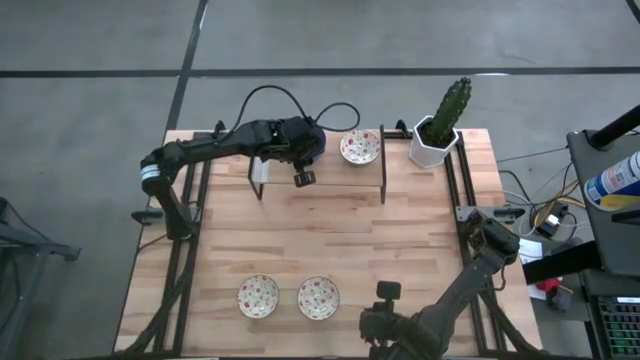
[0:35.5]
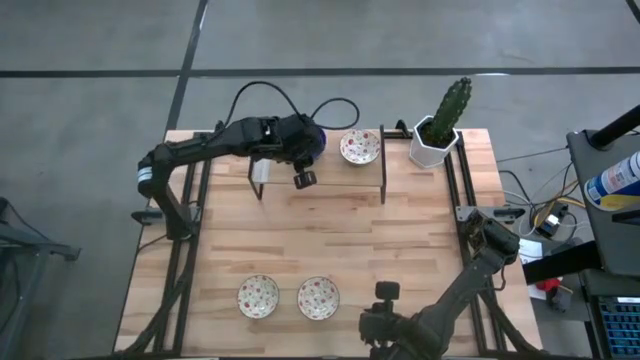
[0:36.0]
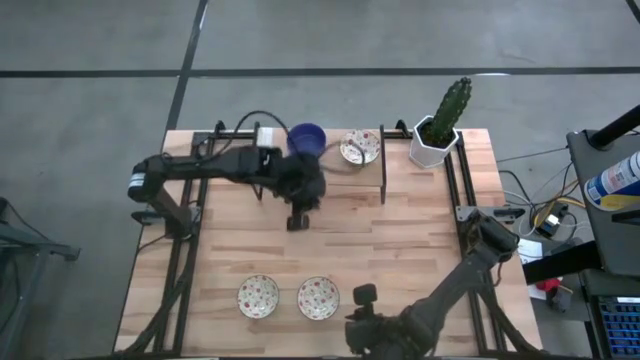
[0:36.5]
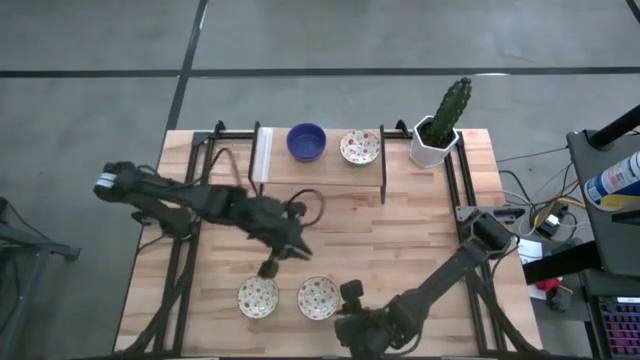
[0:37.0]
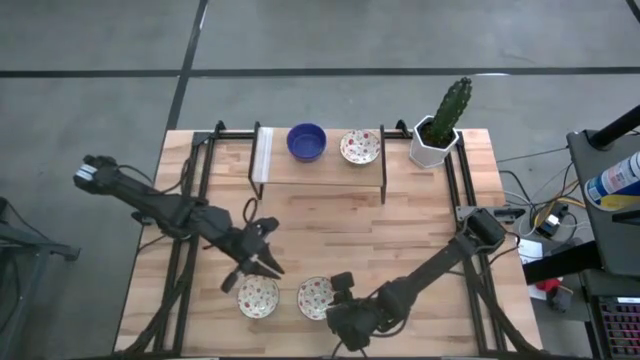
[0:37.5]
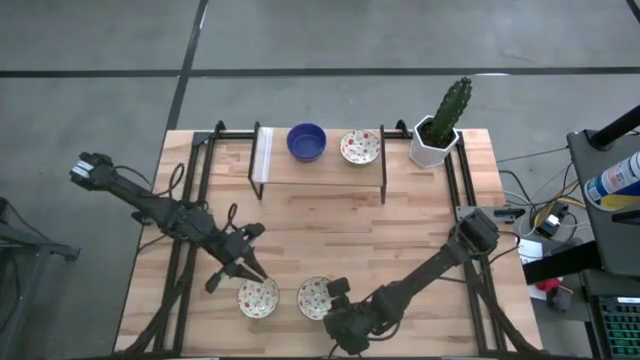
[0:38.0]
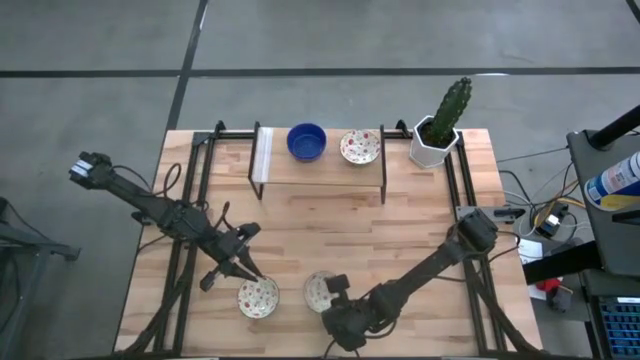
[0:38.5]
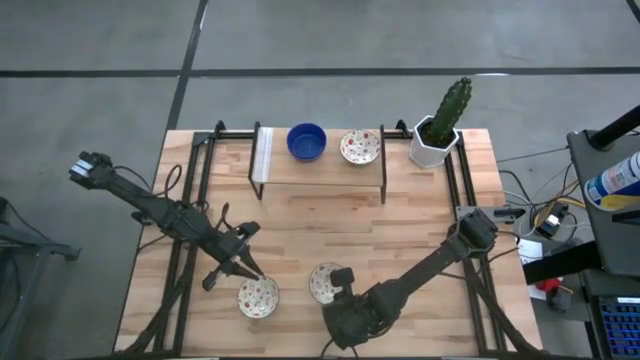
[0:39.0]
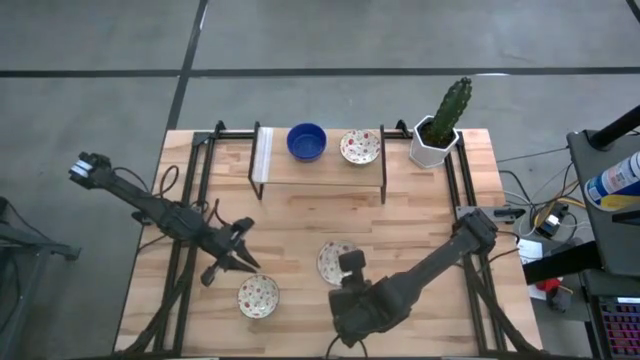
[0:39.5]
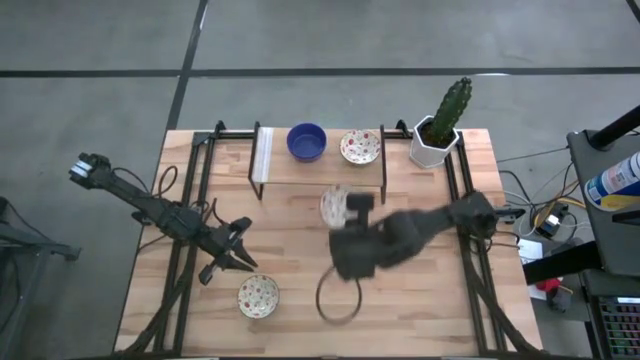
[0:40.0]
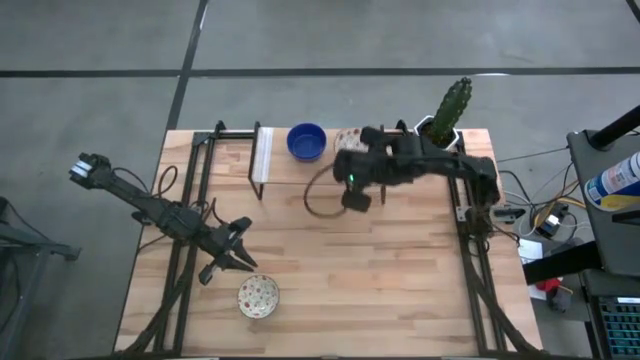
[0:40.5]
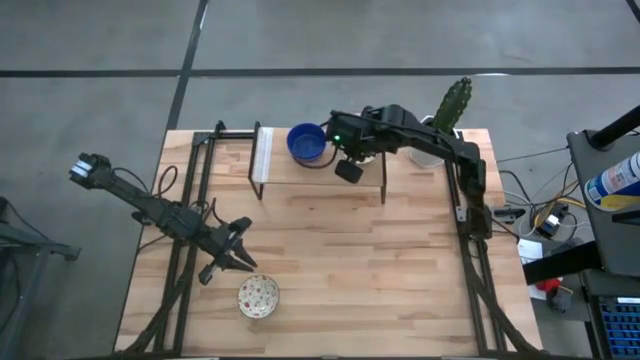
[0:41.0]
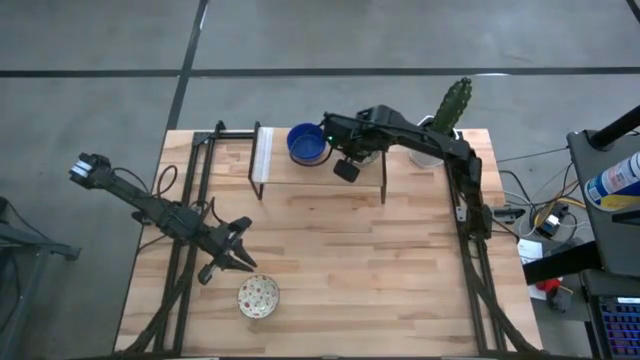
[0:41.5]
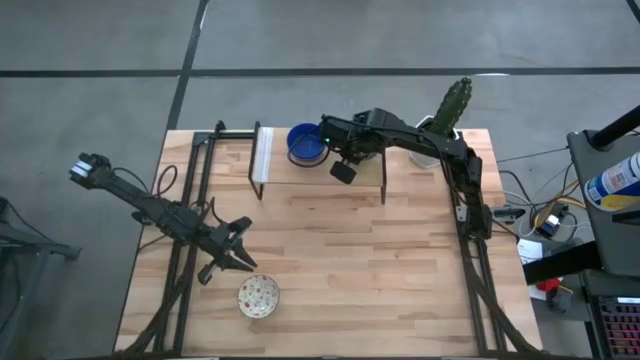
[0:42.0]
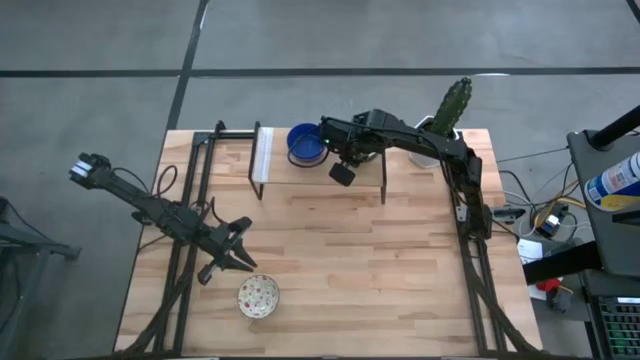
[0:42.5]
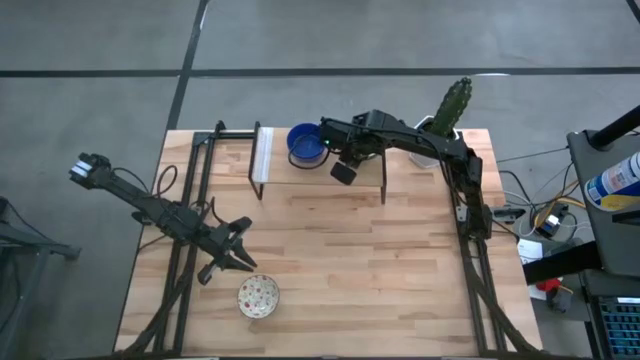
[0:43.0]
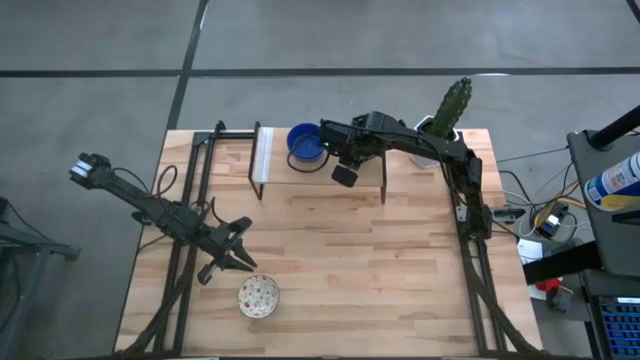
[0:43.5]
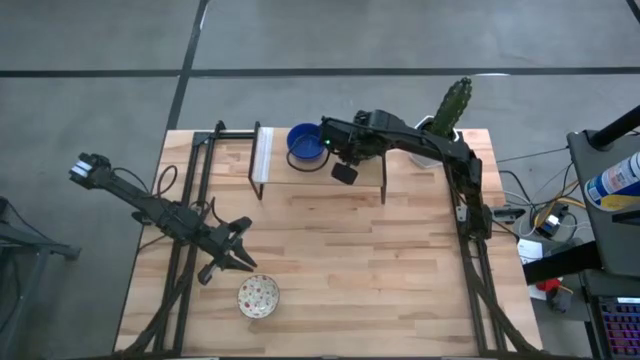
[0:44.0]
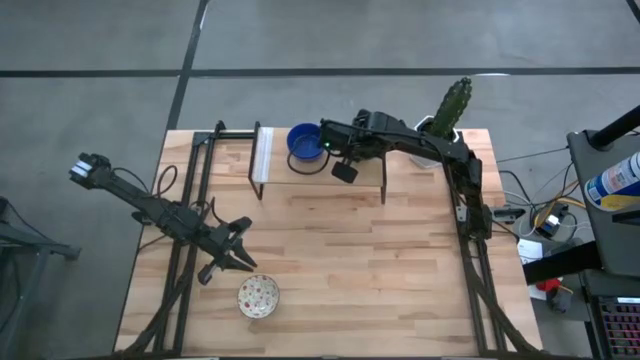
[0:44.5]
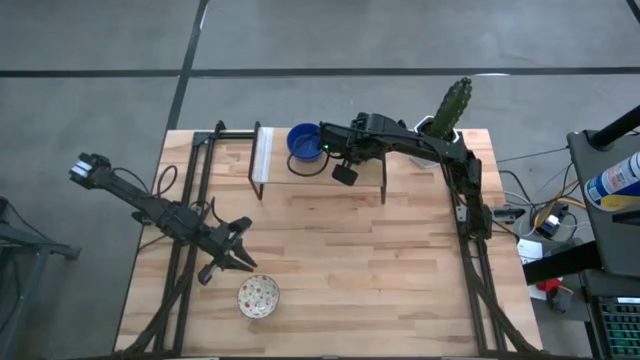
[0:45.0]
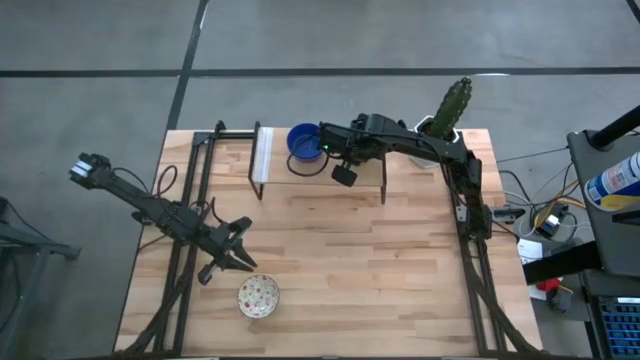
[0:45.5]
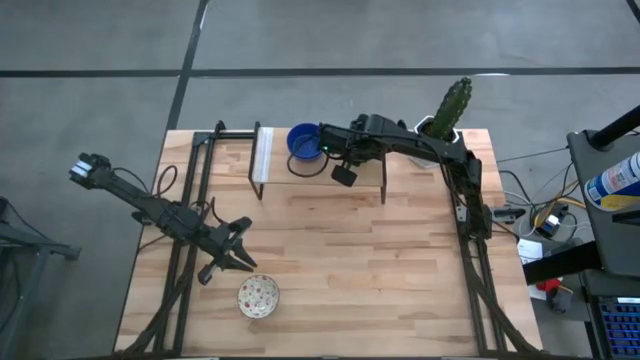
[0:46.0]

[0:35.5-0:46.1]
Task: Pick & Place Mini bowls
Stack the right white bowl on the white bowl on the shelf

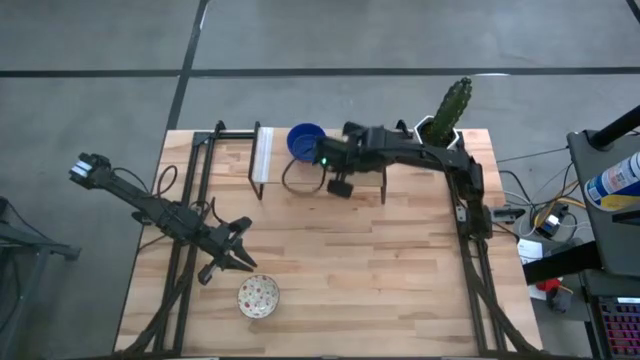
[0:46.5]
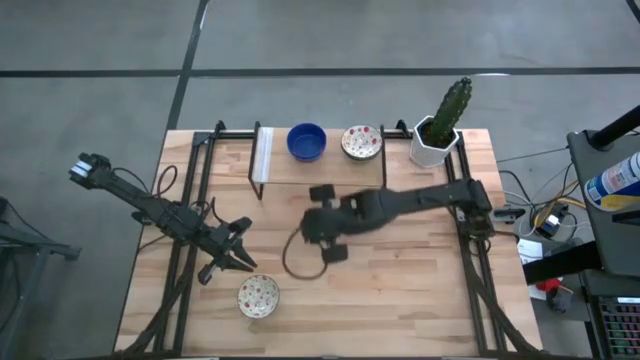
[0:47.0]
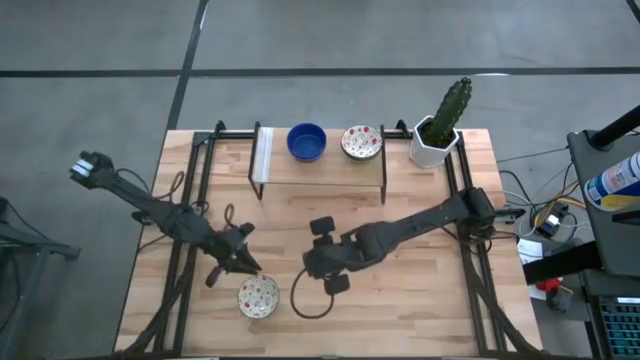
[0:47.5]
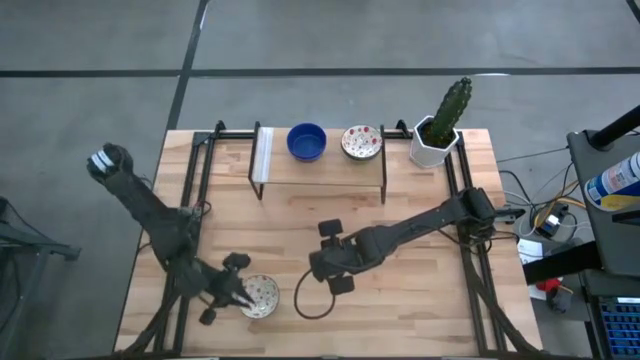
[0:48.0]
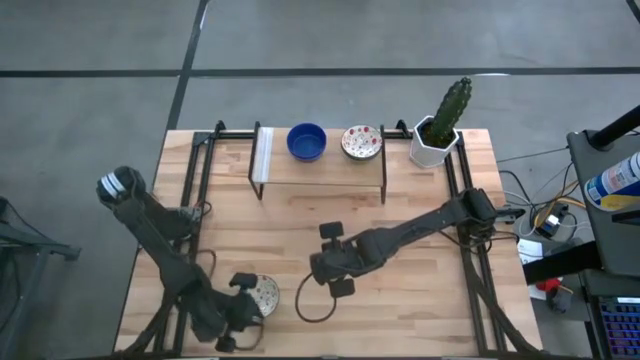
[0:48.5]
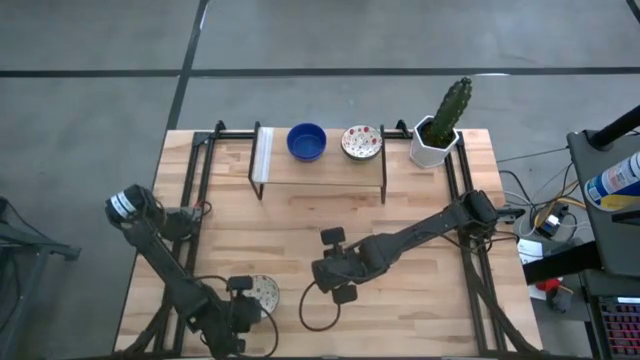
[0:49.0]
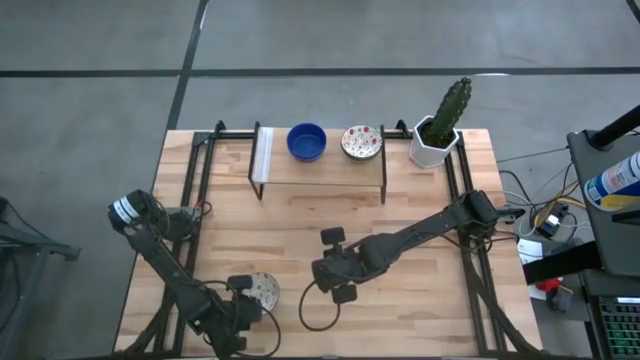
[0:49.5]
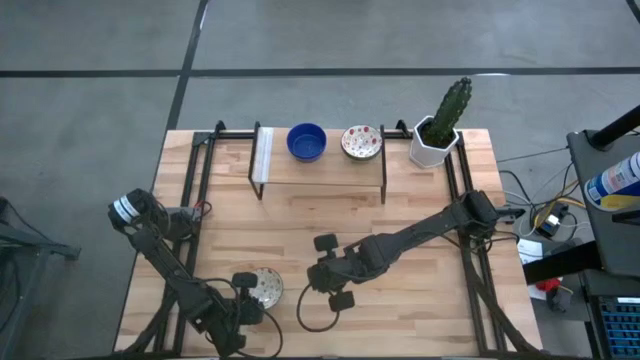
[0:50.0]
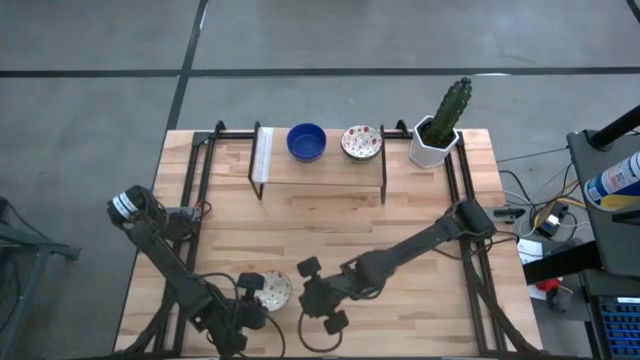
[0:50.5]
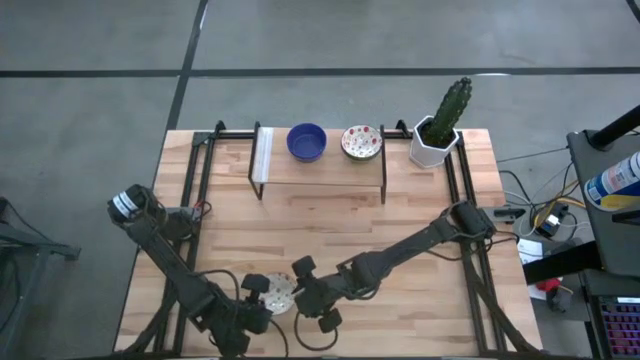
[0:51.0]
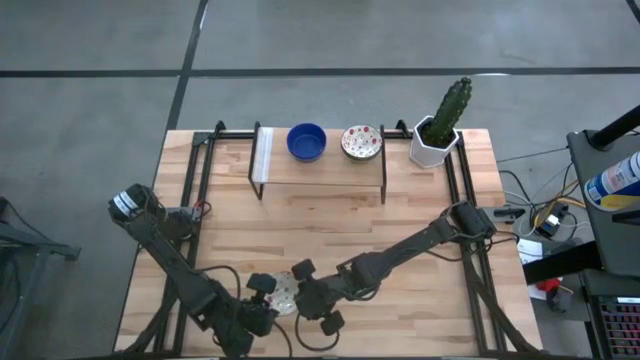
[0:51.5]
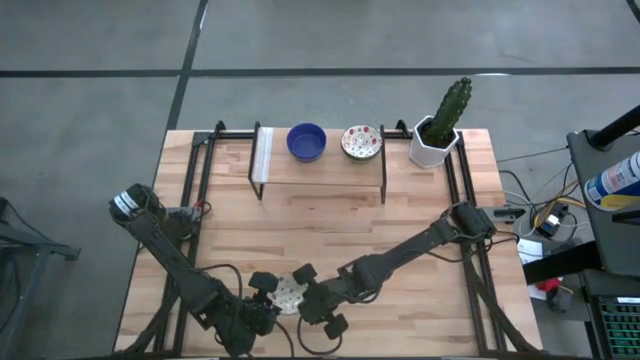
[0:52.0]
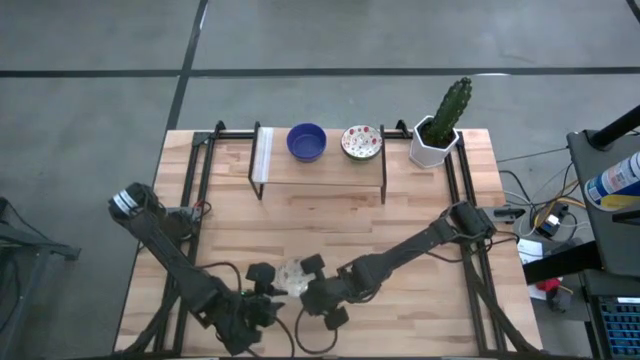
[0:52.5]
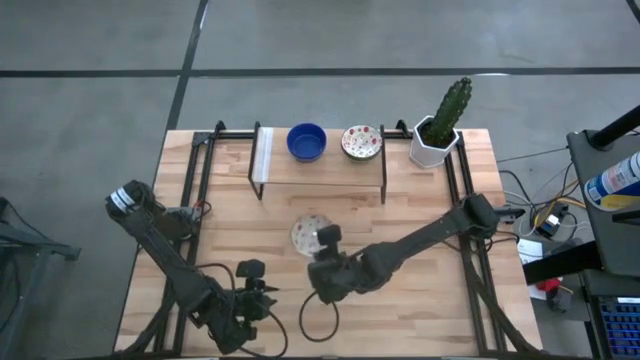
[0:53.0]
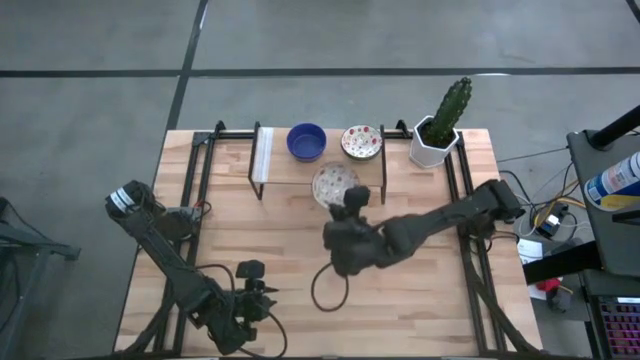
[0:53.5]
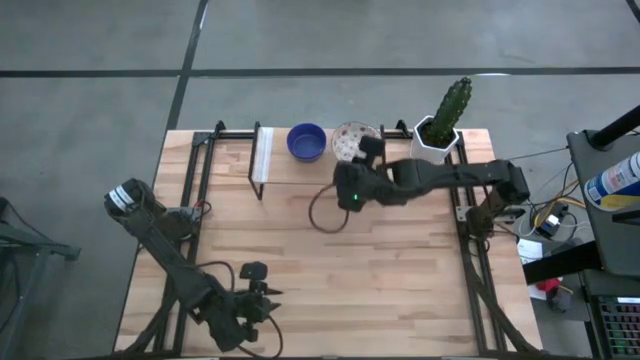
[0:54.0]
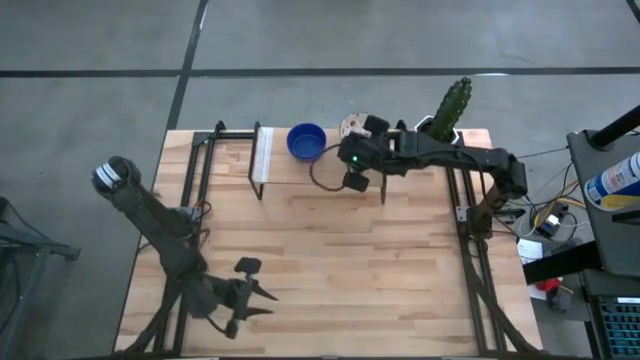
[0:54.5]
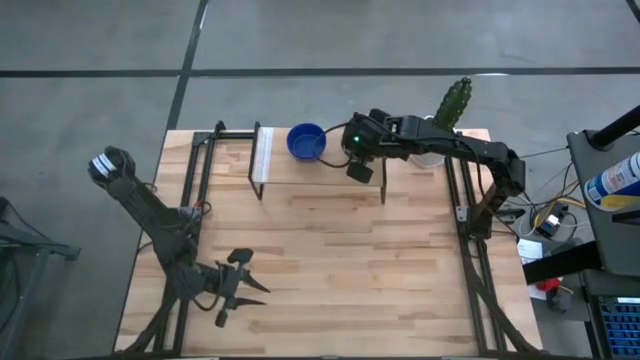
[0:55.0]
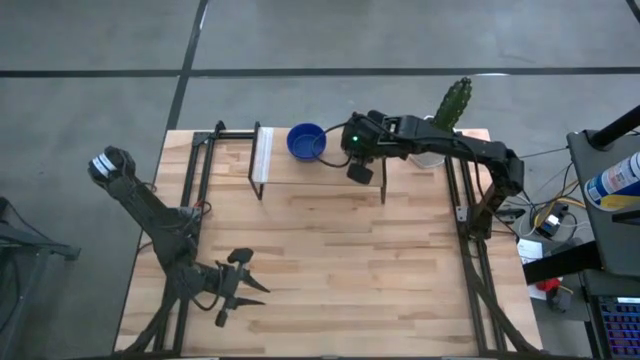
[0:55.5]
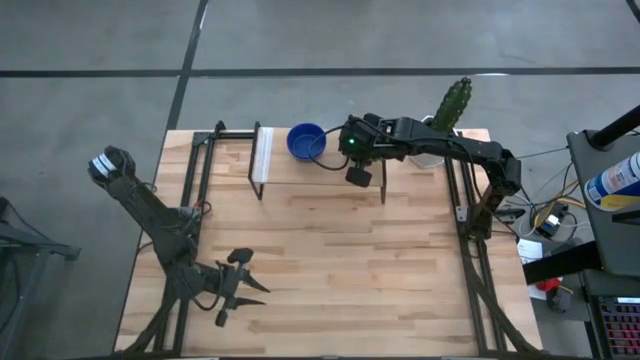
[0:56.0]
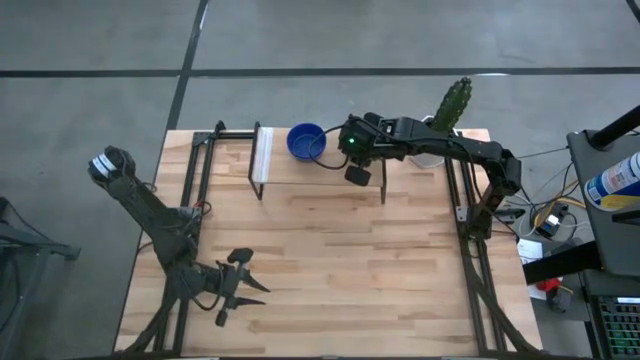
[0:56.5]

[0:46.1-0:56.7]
Stack the white bowl on the white bowls on the shelf
